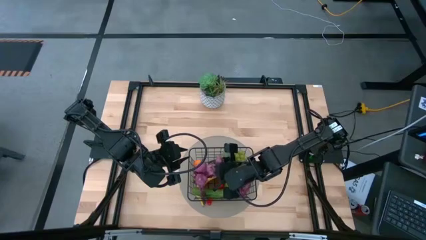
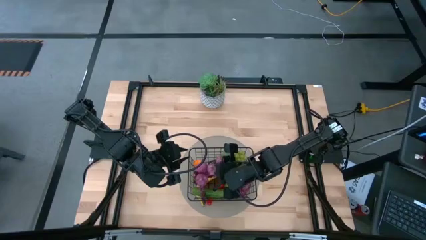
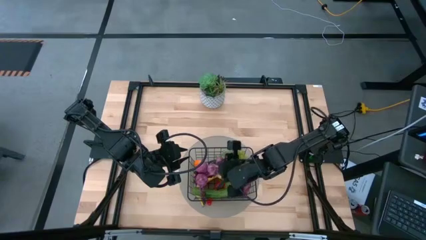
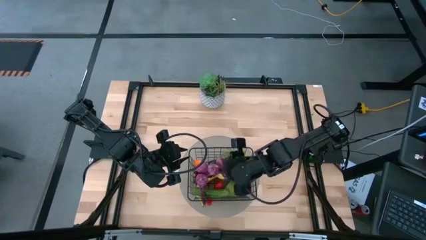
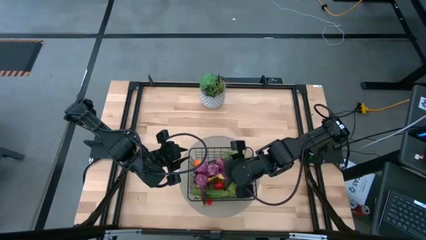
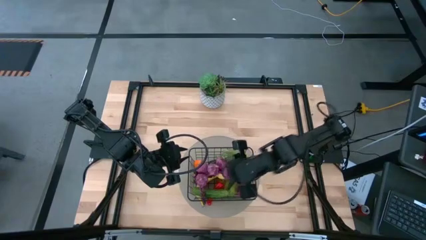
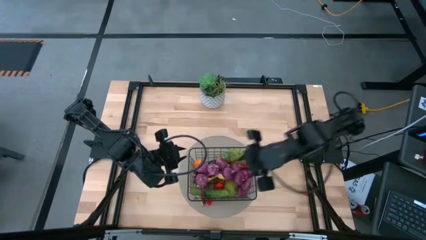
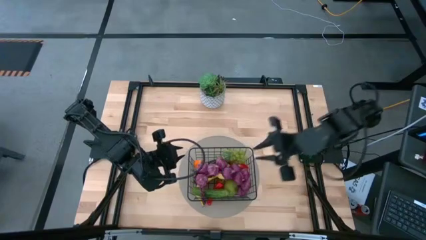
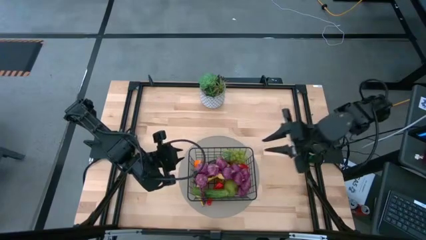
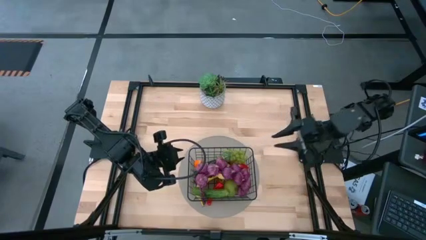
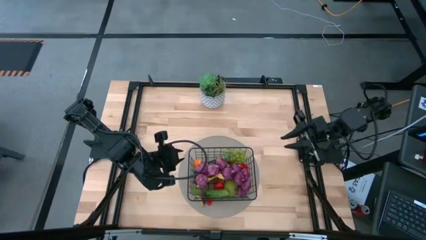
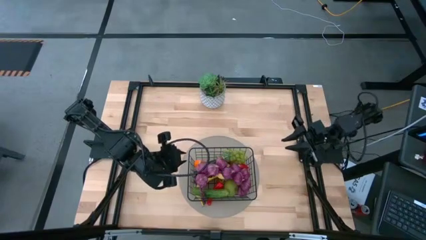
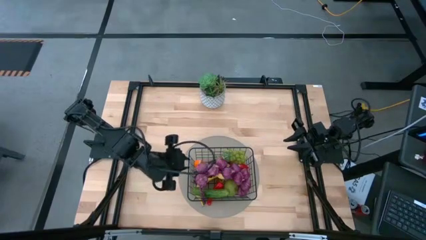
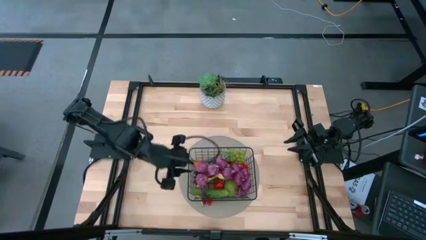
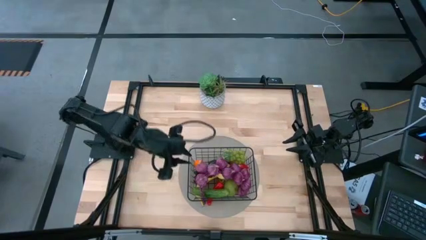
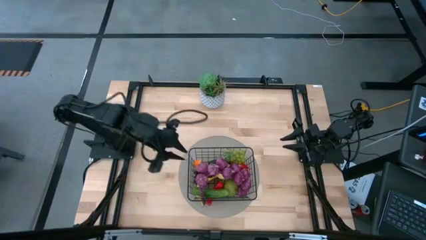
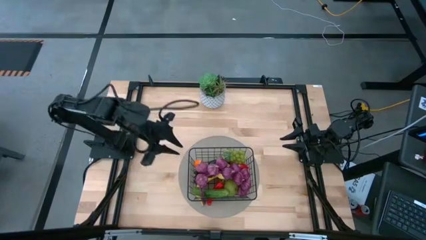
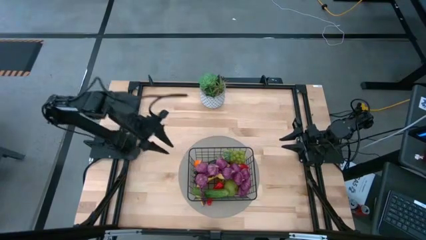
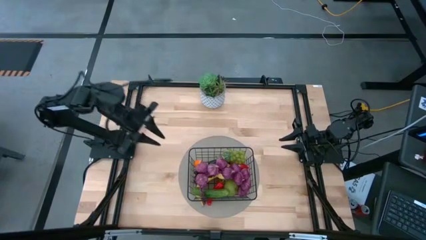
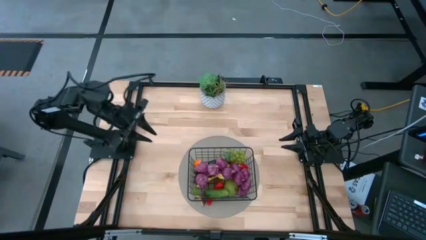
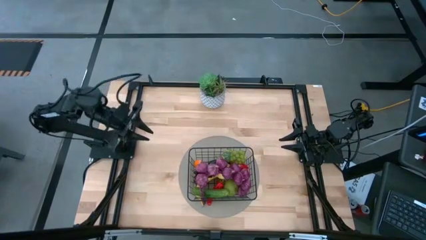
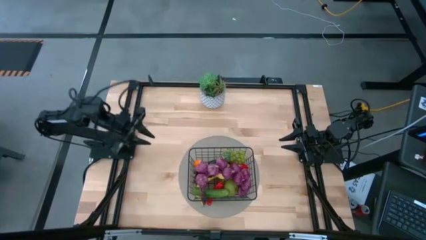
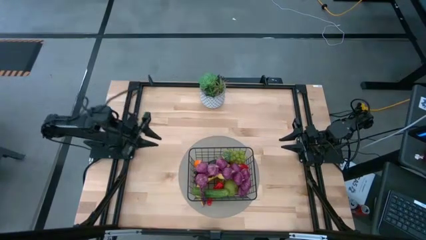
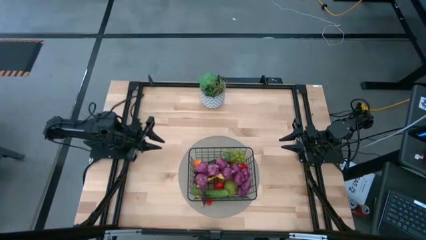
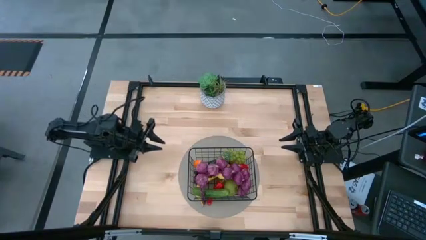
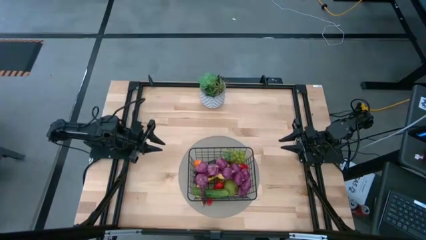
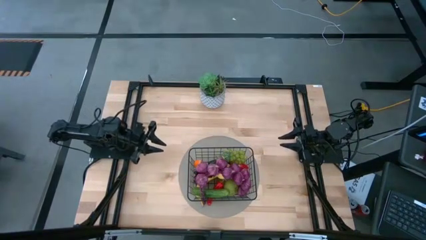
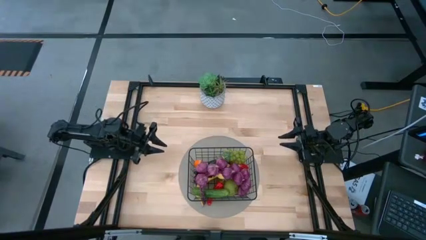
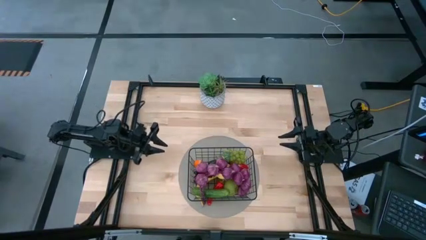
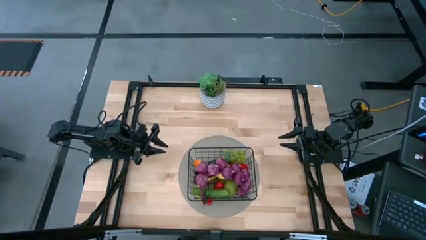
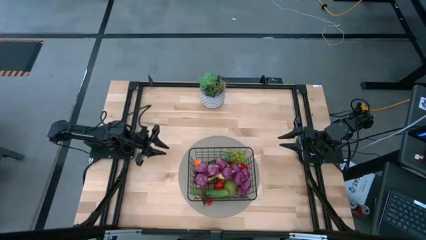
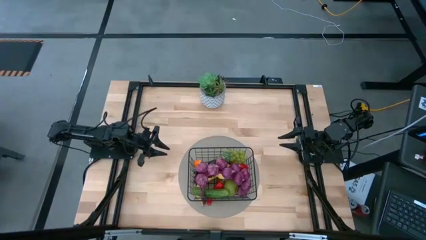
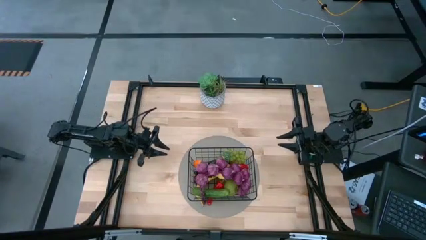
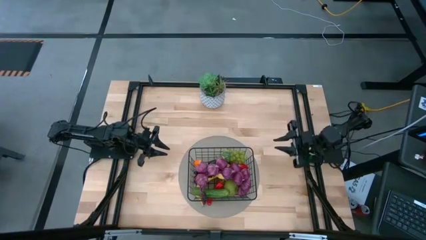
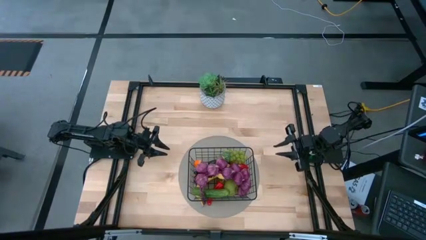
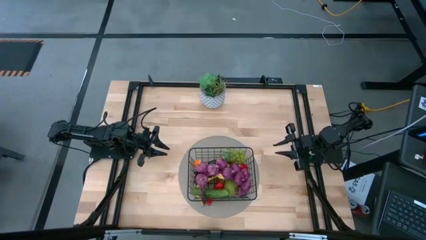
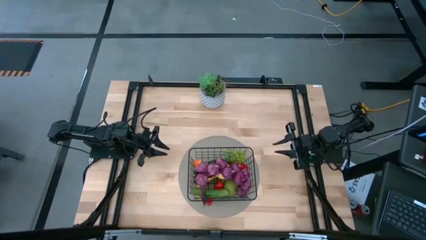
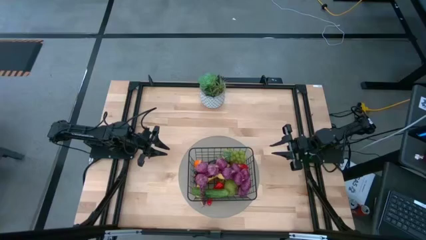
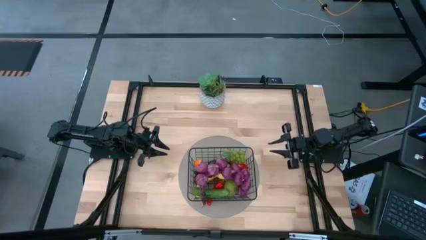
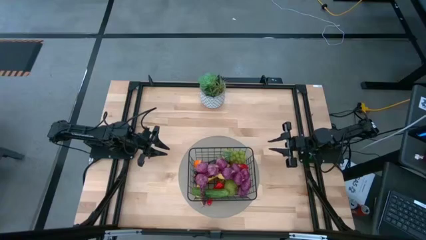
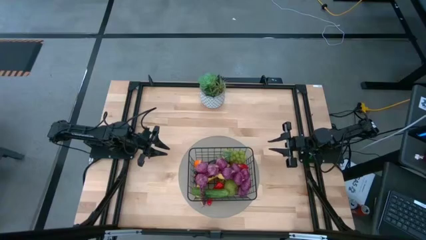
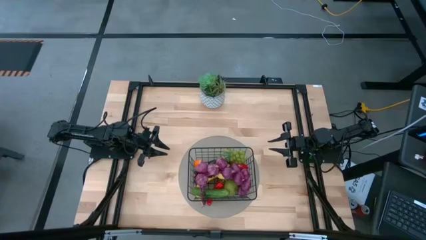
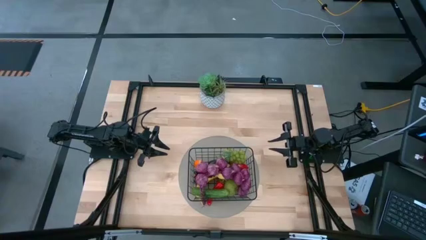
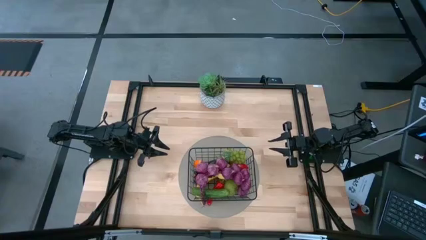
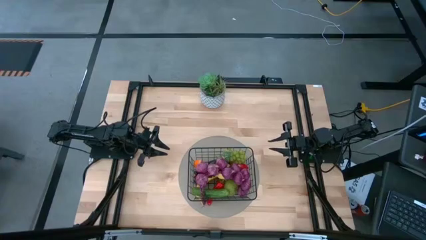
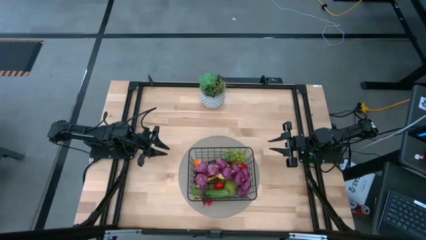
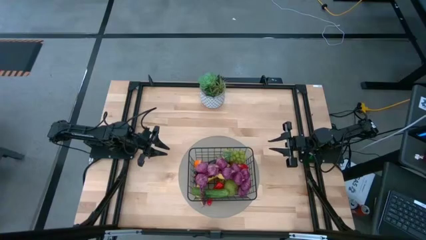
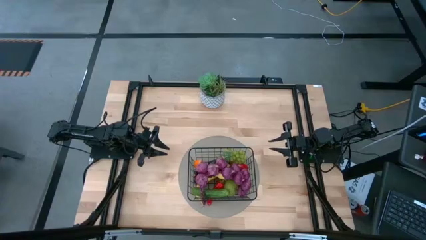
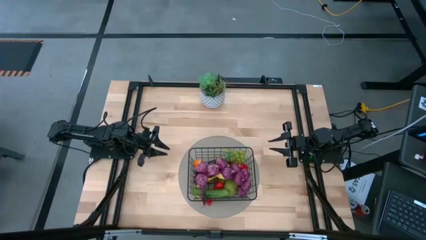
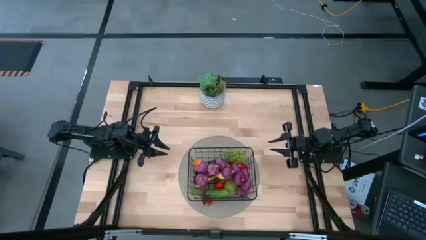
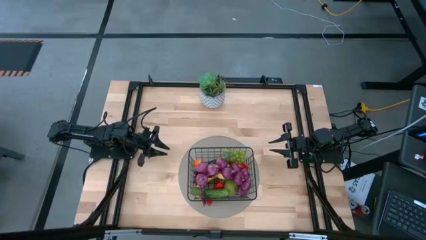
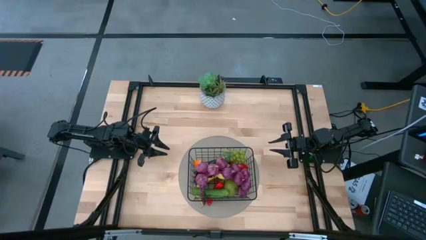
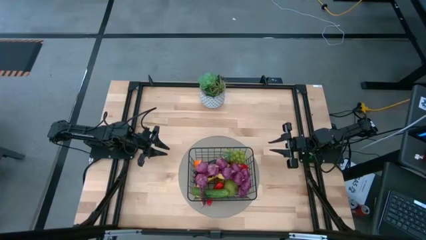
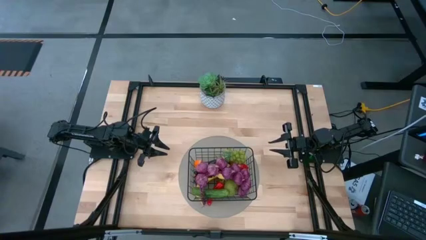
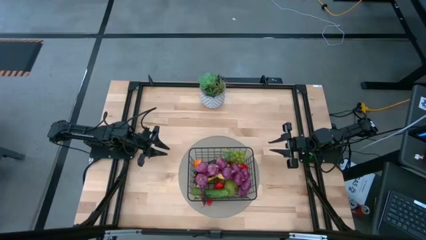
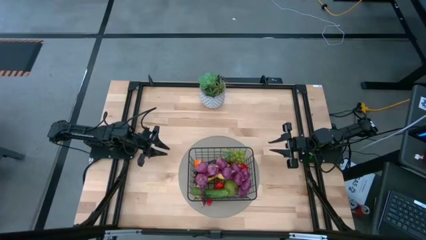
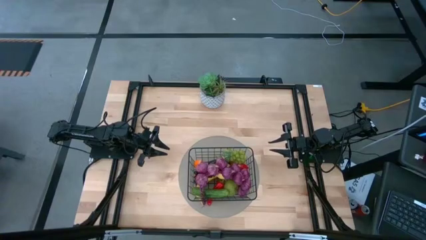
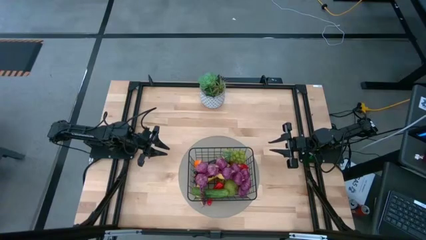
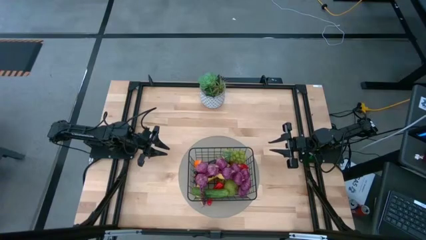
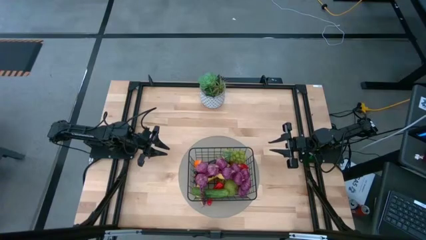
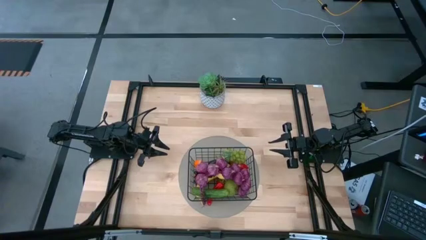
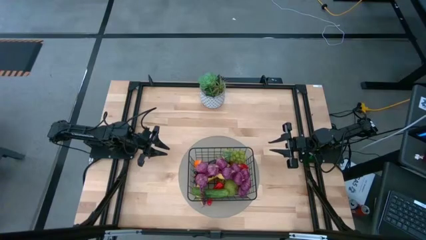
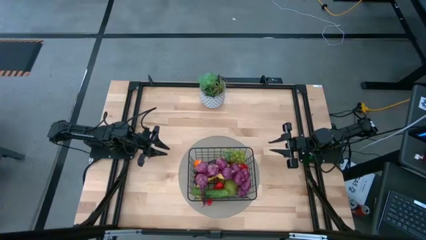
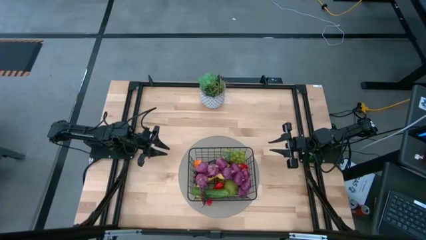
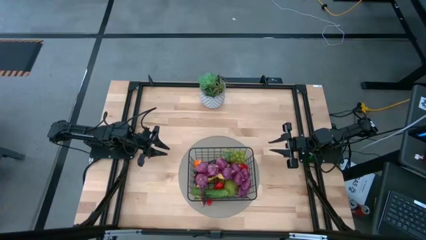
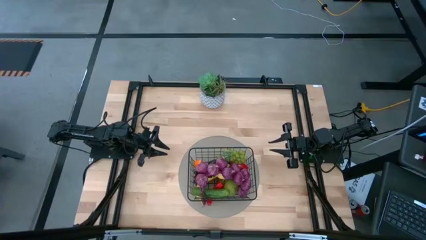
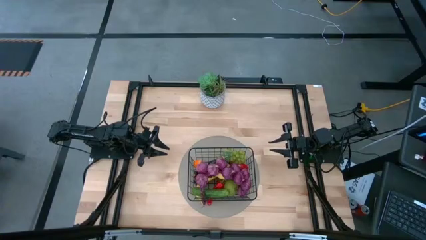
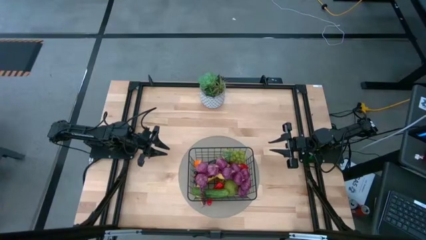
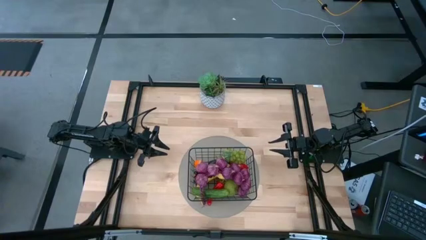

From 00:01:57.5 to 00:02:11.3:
Task: Build produce basket
Return to Home Position

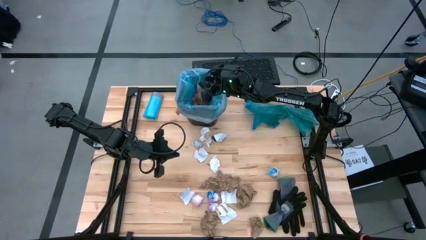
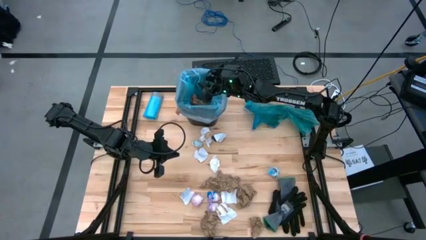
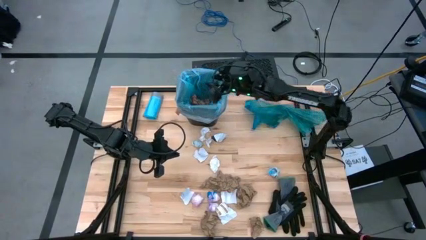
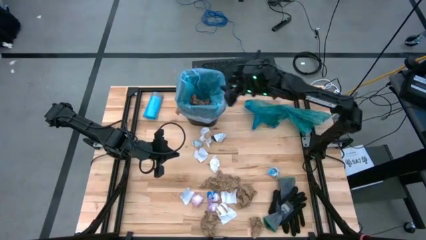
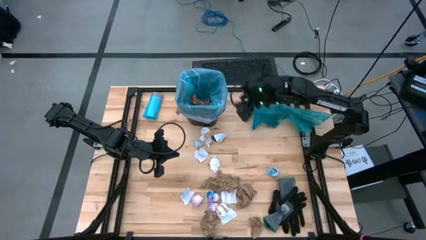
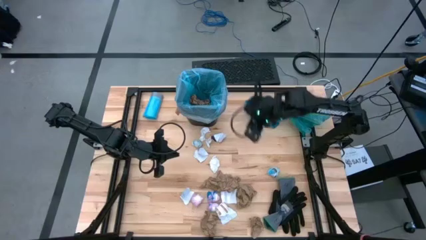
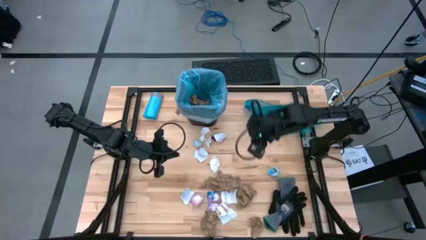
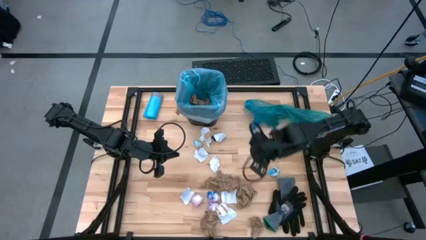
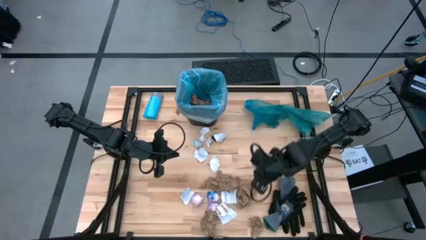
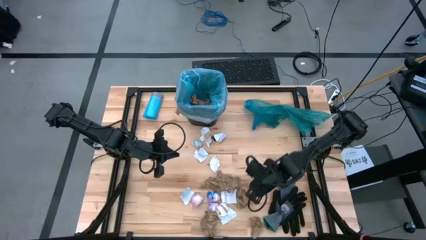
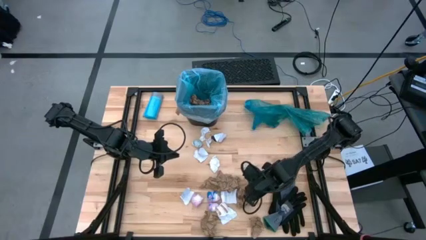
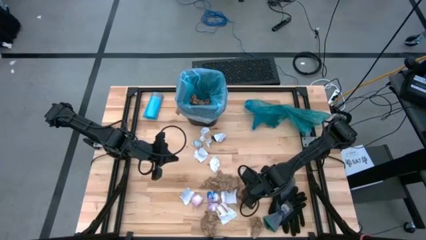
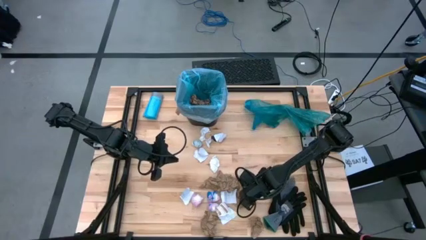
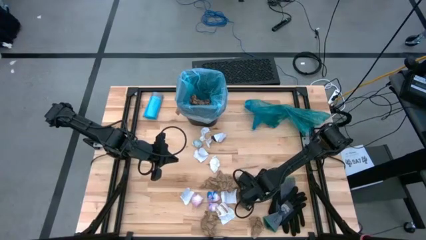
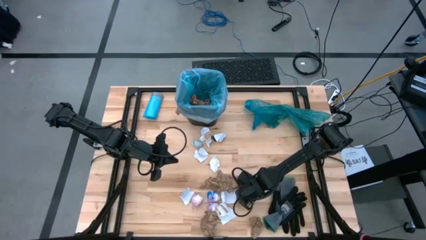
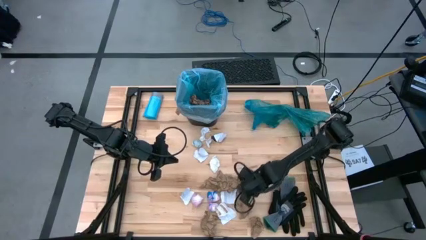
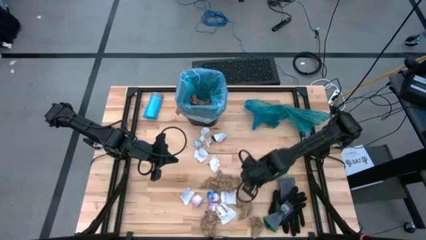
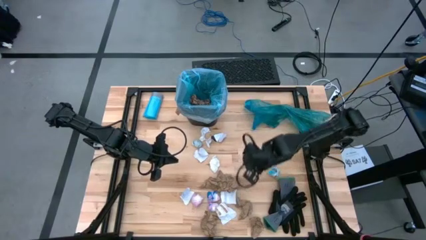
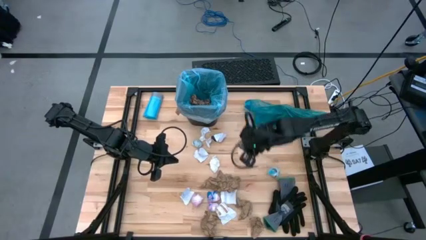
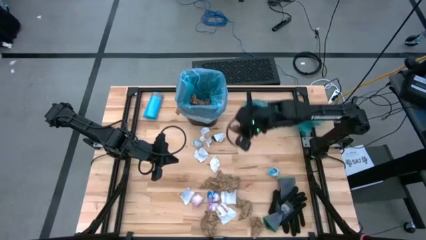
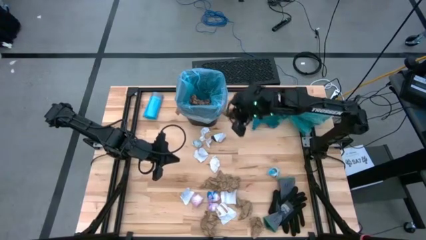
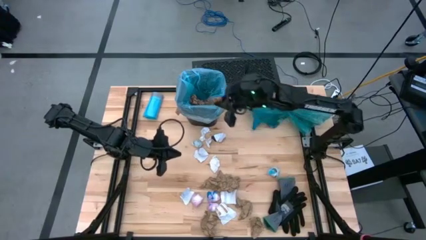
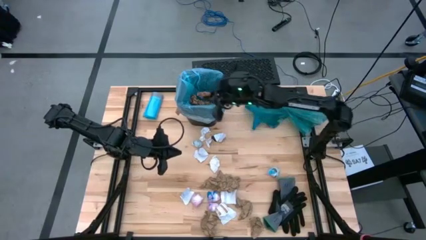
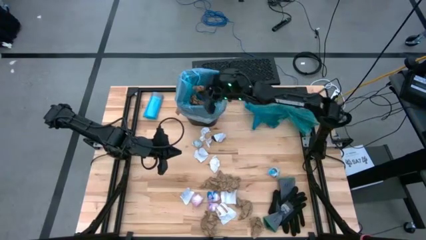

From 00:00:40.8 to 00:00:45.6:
Task: place trash/remove bag and relplace
Put the brown paper trash into the trash bin
